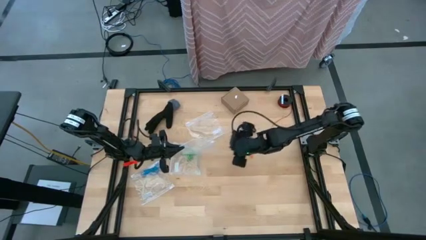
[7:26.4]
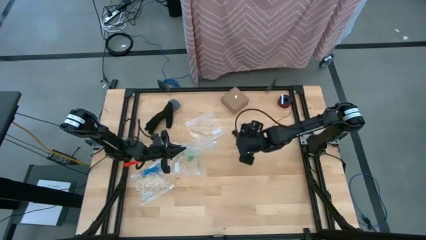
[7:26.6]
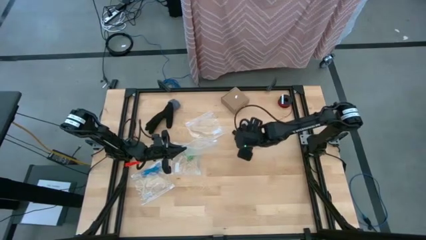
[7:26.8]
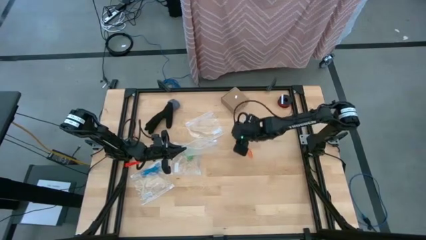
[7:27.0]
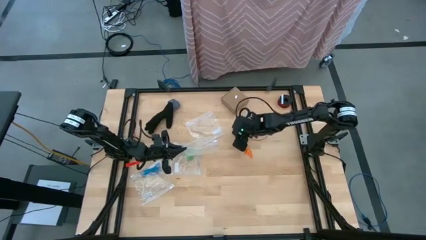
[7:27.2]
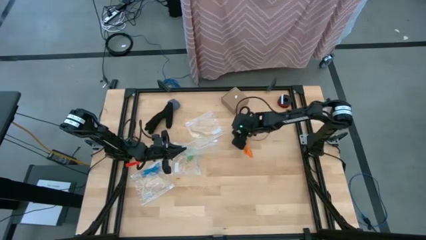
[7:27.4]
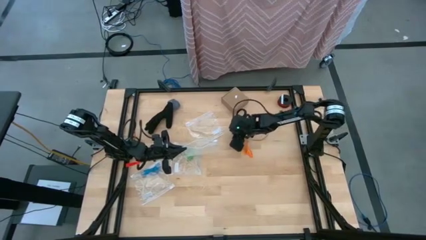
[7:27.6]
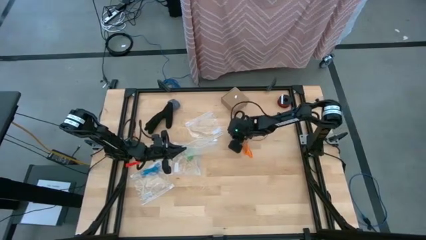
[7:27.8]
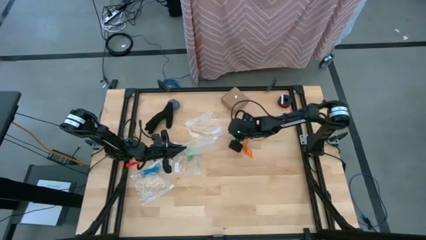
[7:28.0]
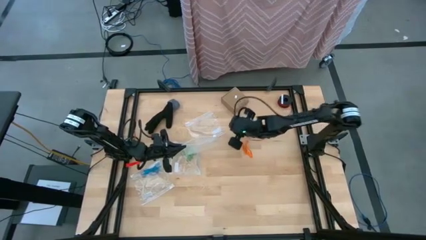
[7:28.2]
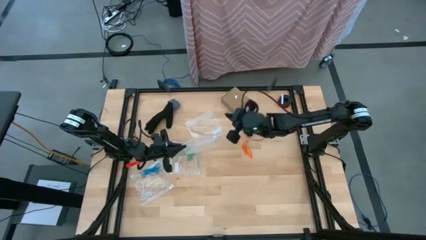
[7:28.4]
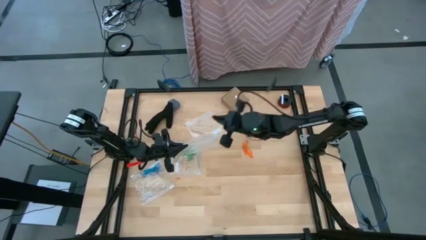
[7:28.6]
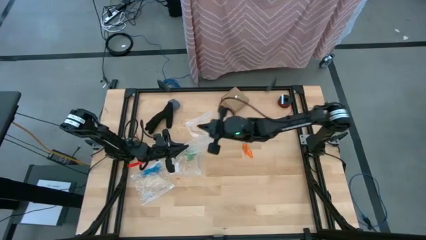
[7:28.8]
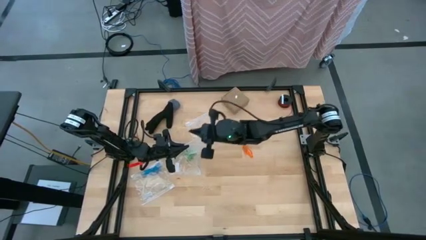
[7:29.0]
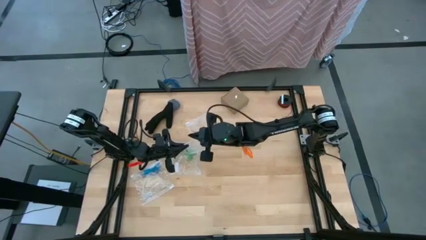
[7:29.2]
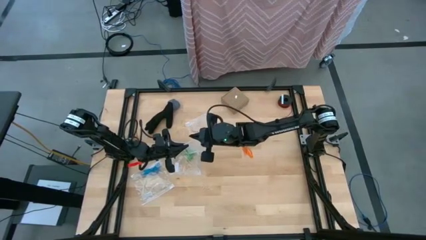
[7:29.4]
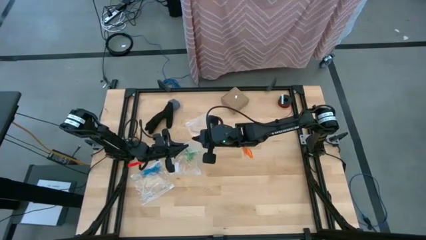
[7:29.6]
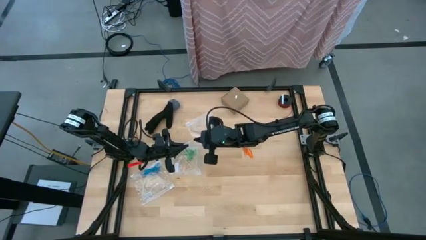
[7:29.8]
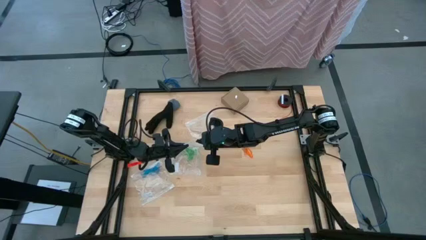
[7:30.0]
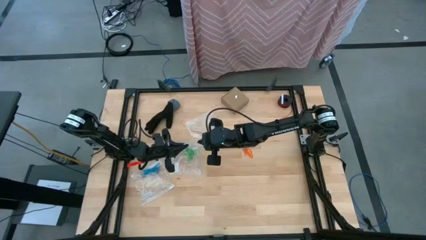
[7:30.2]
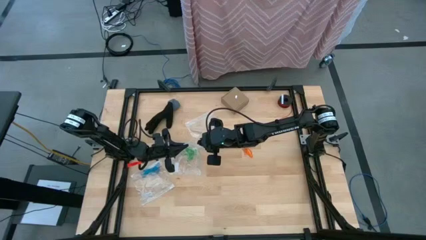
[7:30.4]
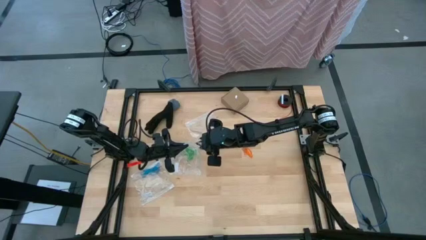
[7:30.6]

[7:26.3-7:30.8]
Task: Sort rubber bands
Put the black rubber band into the transparent zip bag

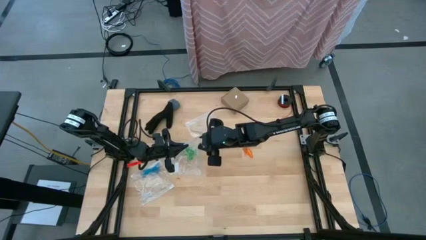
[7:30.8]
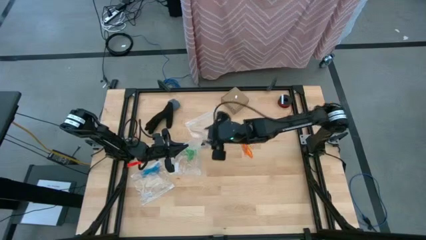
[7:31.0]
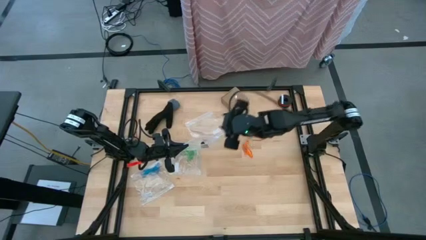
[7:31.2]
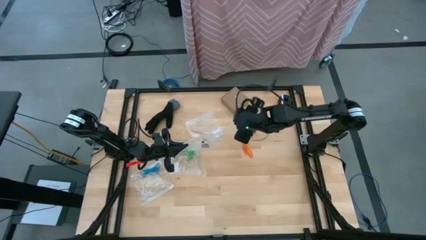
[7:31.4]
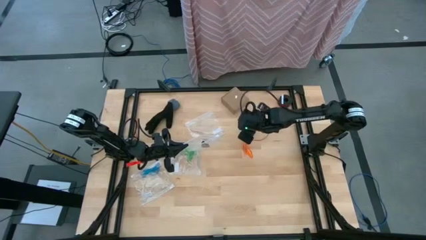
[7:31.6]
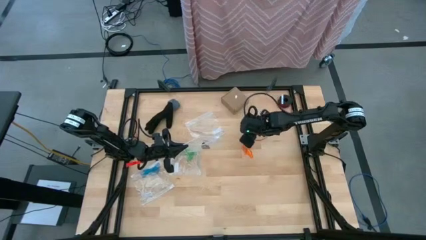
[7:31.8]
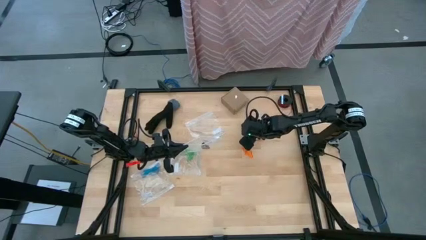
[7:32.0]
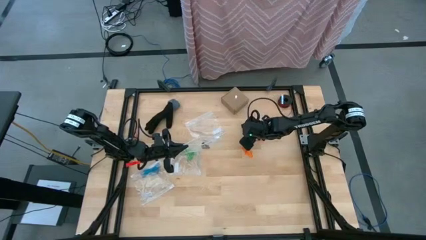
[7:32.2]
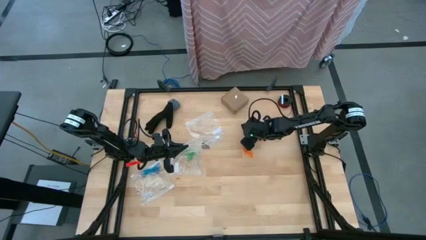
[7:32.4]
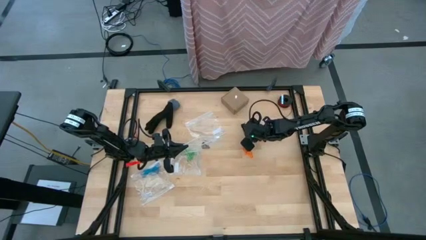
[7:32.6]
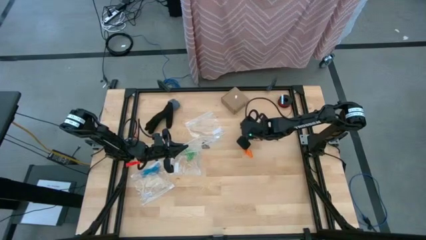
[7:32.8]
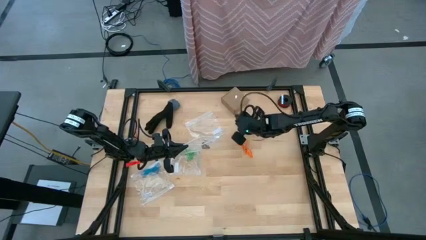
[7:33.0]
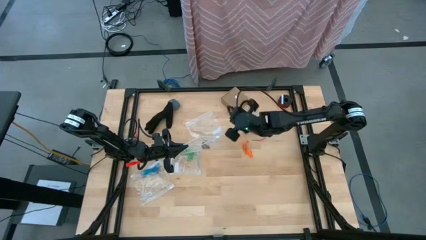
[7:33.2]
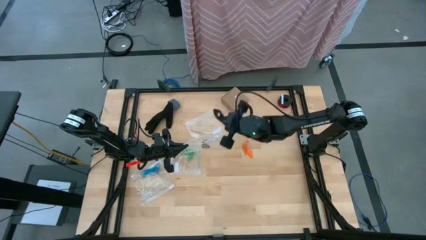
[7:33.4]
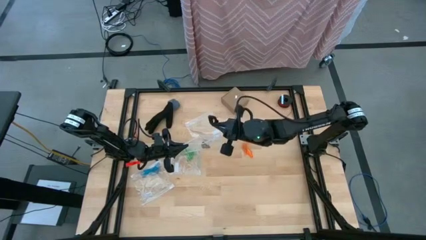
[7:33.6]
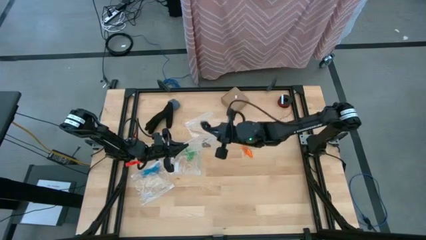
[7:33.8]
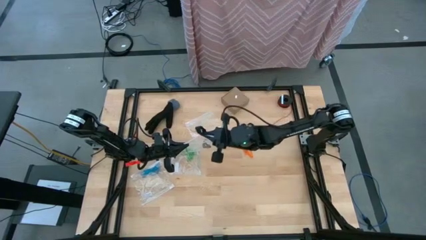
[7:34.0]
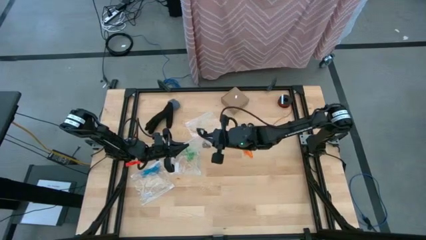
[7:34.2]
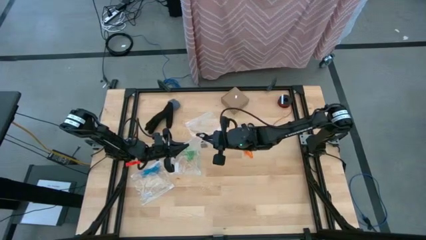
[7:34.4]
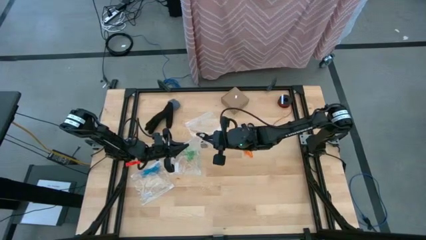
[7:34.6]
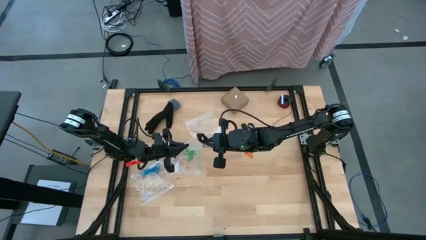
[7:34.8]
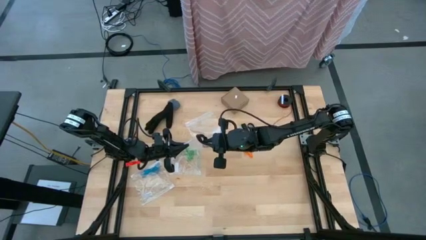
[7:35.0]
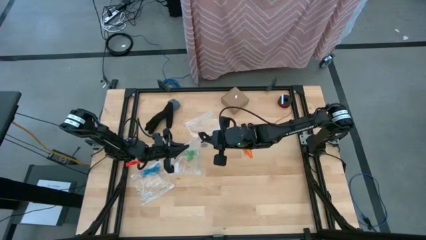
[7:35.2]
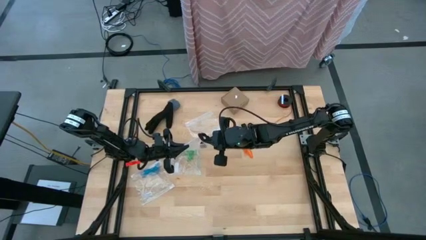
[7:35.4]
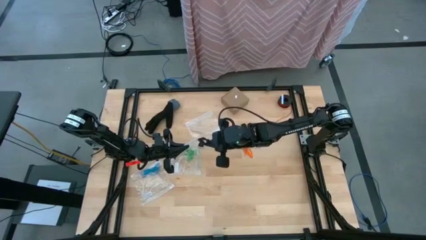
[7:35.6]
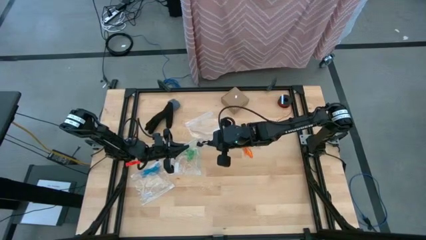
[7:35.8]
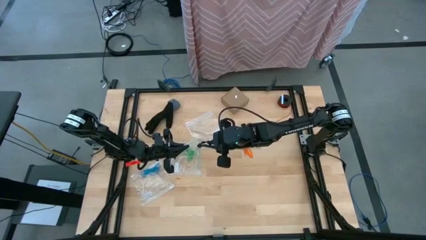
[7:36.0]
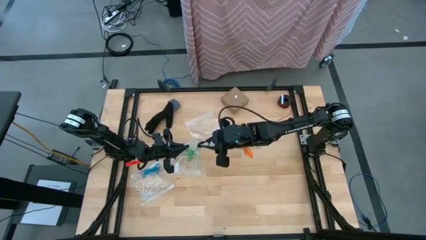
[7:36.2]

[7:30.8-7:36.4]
Put the black rubber band into the transparent zip bag

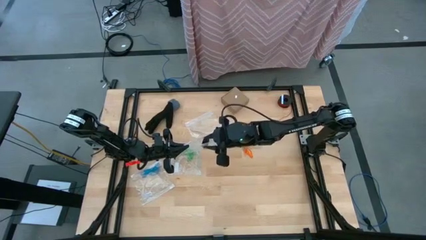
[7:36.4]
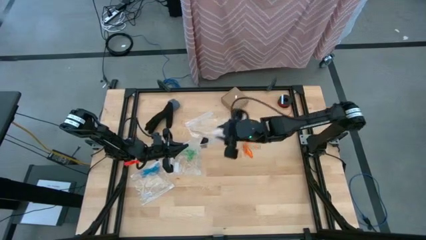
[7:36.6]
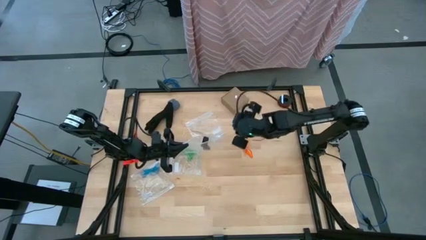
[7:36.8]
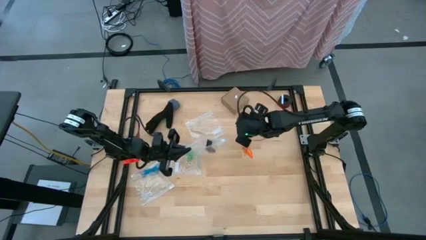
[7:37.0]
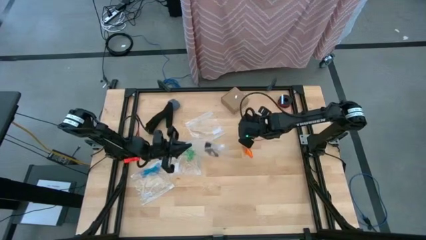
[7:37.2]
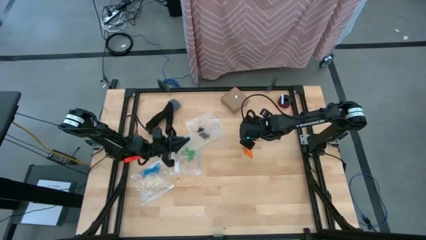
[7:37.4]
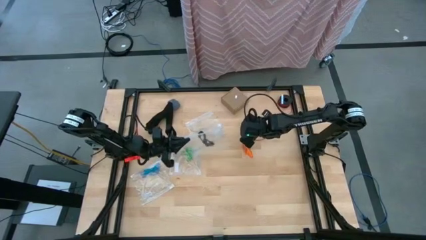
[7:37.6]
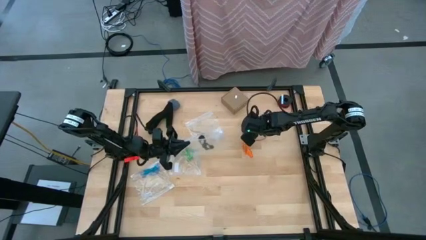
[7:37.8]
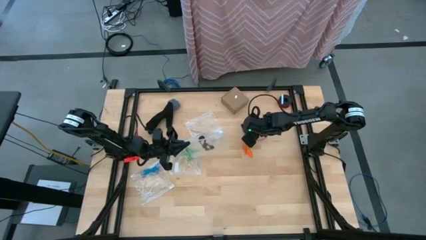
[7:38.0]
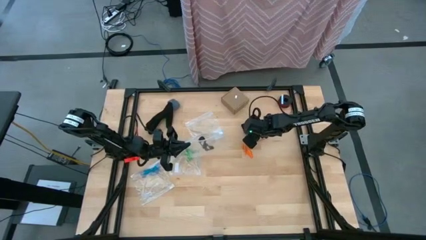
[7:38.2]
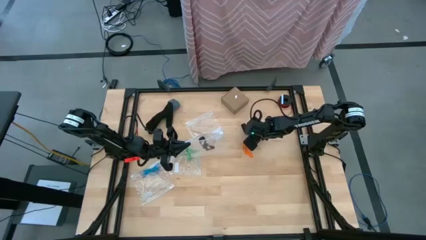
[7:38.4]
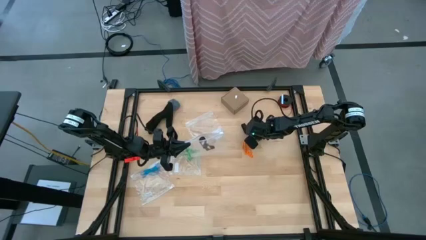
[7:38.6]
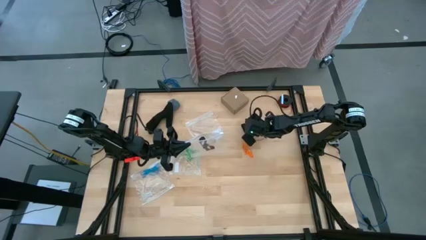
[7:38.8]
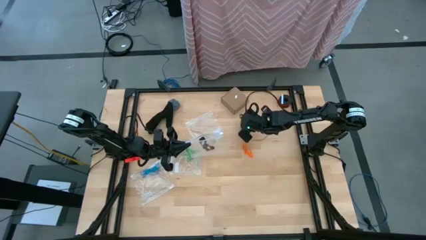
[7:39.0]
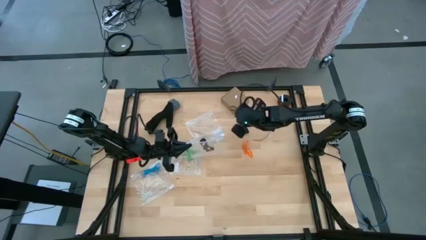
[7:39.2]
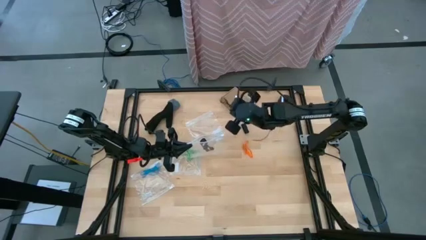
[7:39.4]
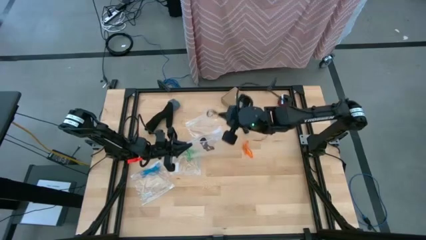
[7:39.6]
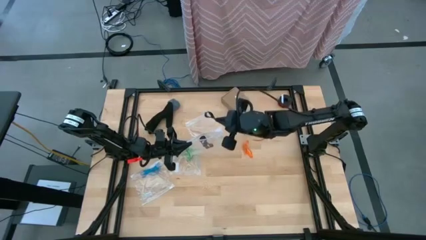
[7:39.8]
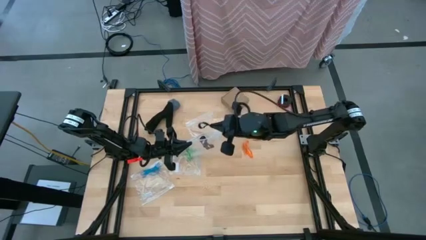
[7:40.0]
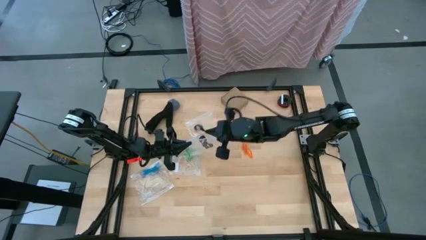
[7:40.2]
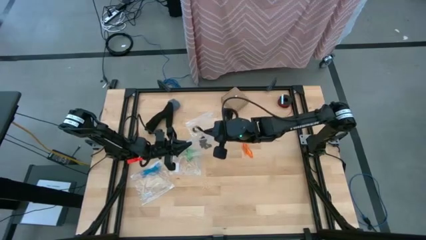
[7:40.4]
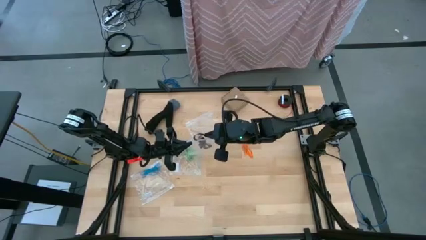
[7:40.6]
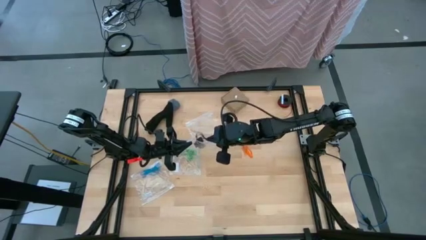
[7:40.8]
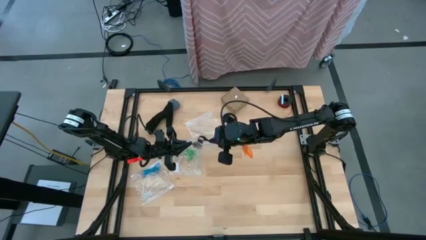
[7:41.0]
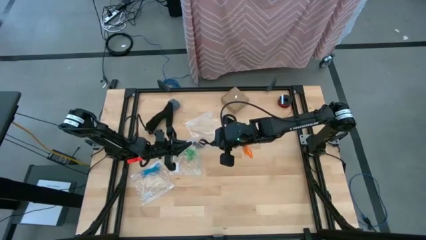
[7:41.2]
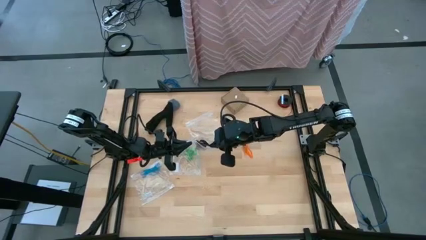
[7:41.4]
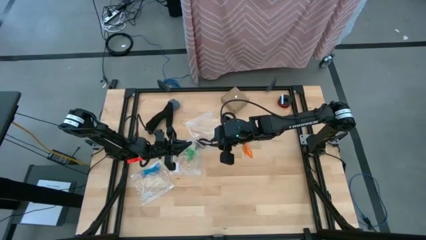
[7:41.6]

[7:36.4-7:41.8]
Put the black rubber band into the transparent zip bag

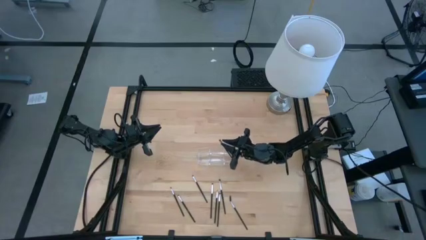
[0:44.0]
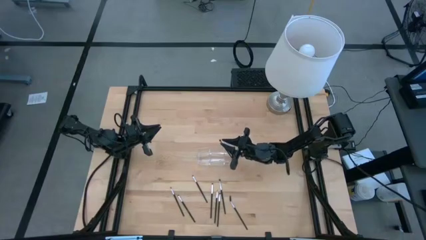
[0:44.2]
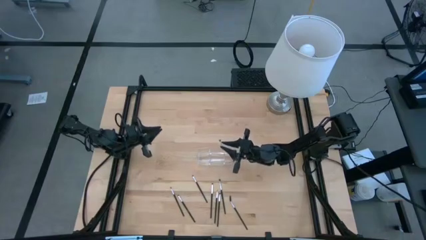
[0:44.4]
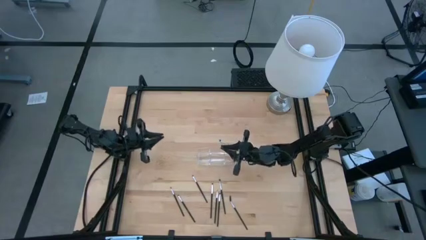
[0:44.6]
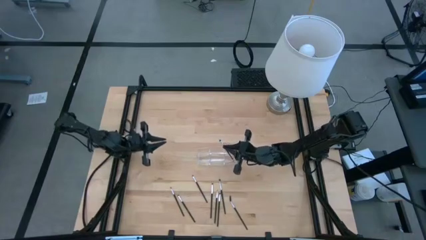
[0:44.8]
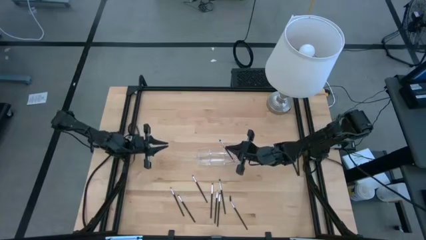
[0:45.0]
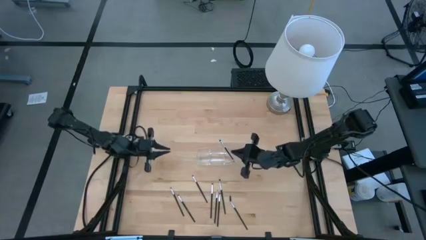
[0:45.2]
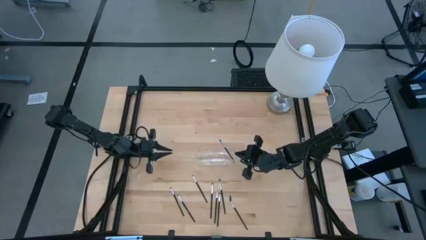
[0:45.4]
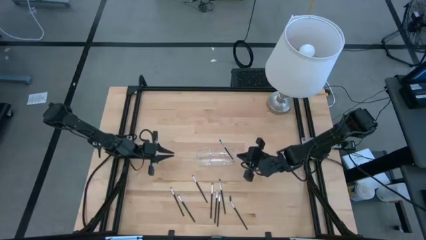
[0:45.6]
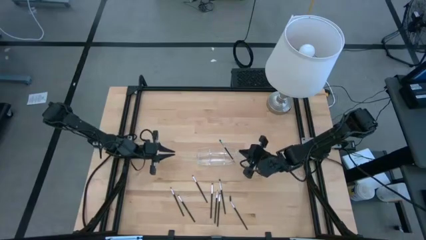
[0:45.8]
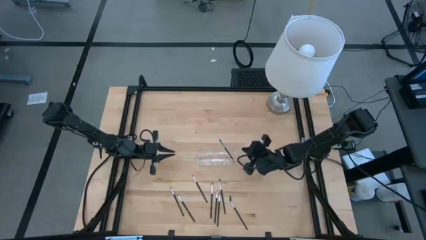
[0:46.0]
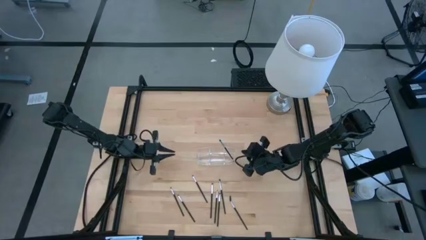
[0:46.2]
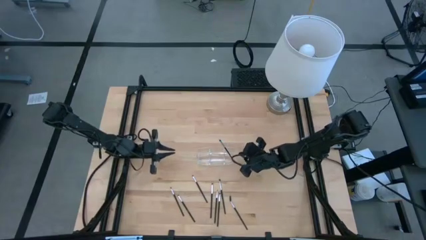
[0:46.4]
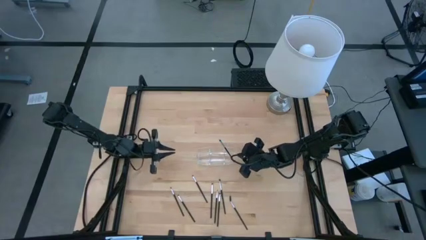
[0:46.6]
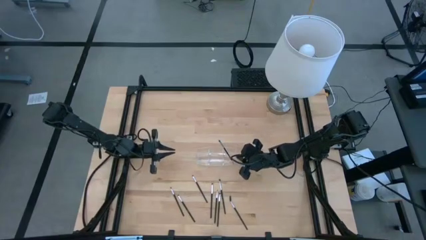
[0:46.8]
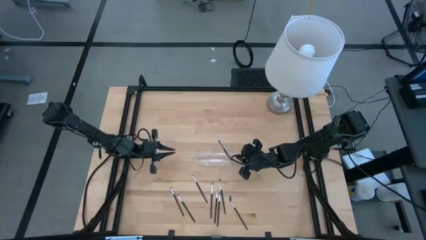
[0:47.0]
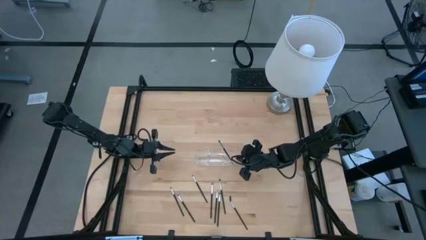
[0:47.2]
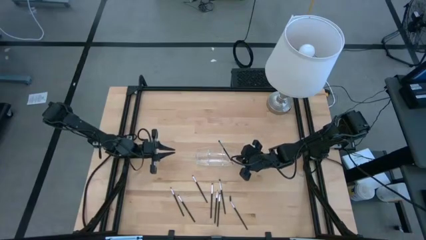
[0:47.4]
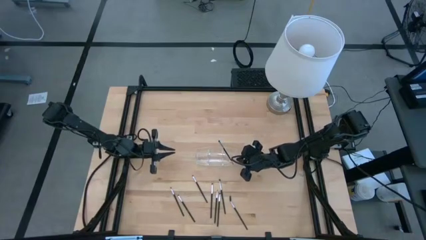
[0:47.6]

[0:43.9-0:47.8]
Task: Pick & Place Makeup Supplies
Adjust the transparent organizer
